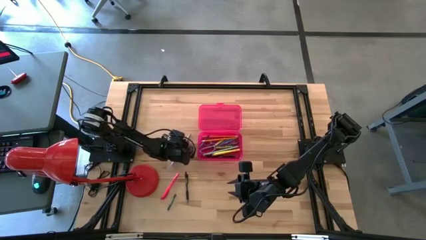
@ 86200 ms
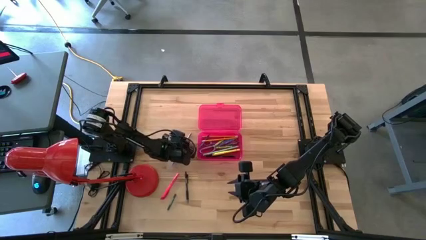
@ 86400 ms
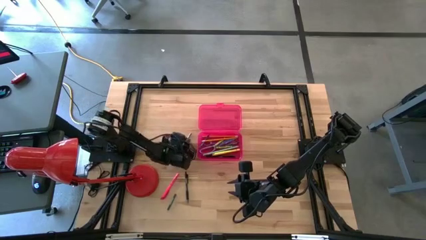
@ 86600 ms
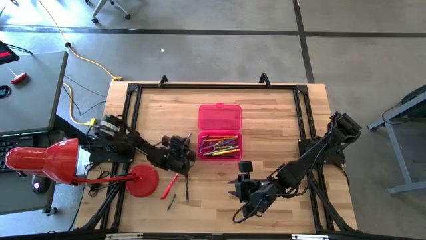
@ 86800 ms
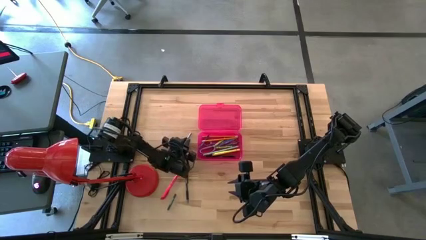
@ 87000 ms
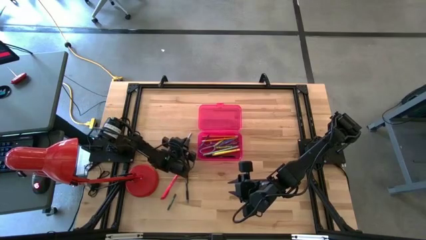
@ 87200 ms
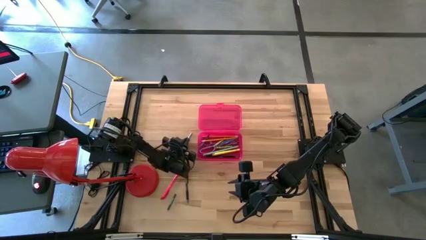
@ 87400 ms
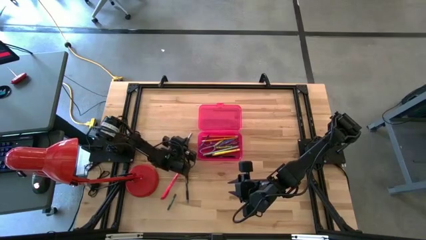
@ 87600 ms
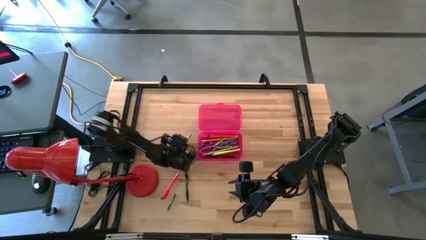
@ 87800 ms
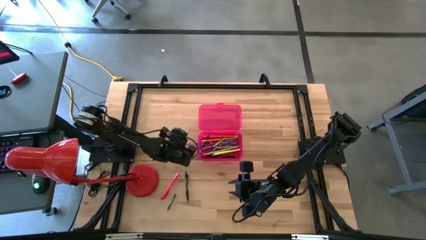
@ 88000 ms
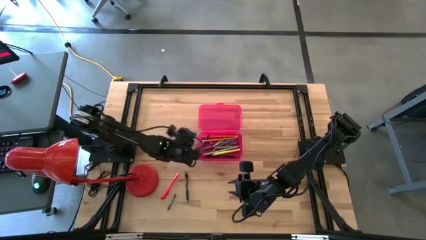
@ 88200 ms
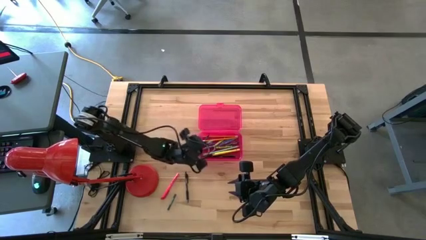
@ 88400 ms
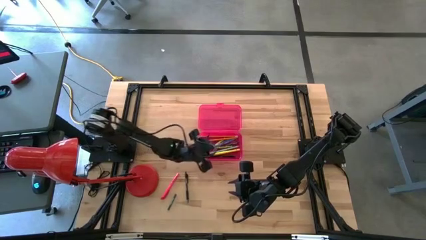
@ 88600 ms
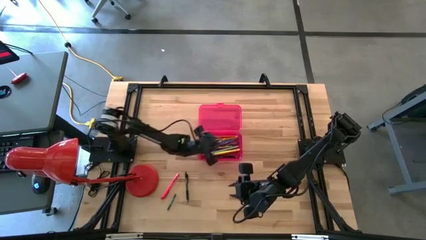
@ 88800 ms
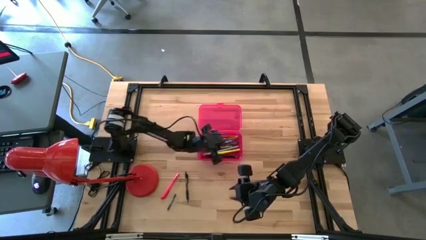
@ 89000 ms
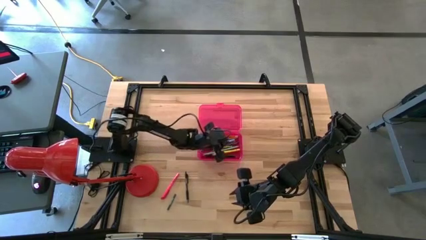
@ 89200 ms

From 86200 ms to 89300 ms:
Task: Pick & place school supplies into a supply box
Put the light blue pencil into the pink supply box

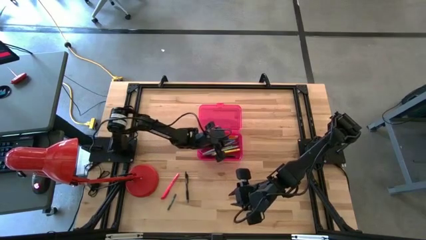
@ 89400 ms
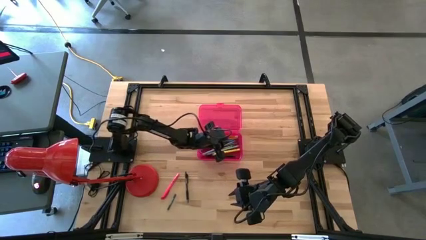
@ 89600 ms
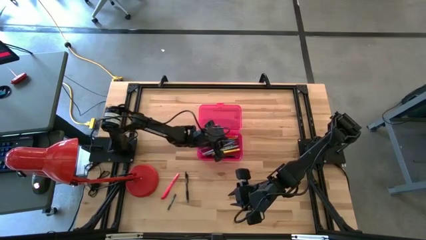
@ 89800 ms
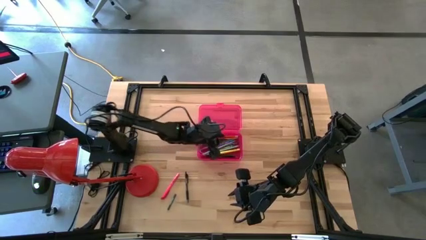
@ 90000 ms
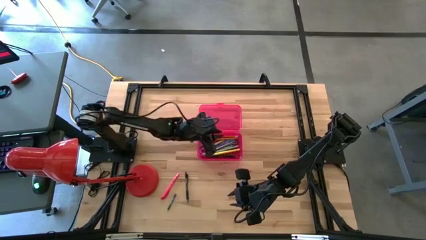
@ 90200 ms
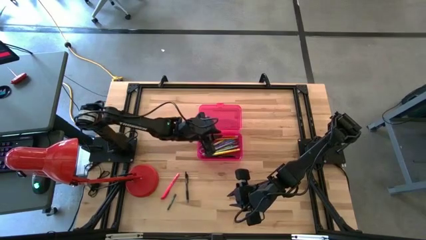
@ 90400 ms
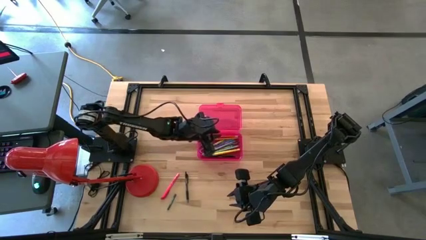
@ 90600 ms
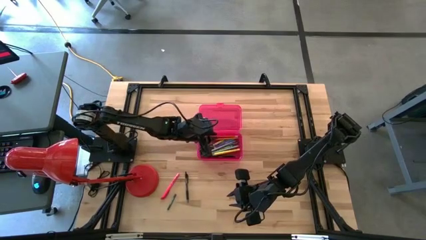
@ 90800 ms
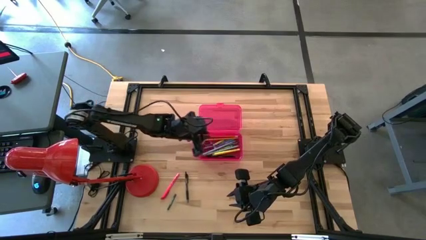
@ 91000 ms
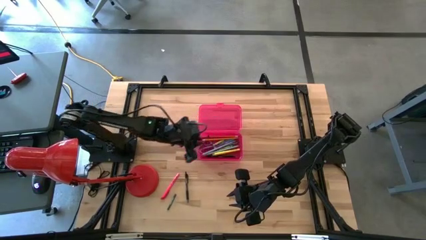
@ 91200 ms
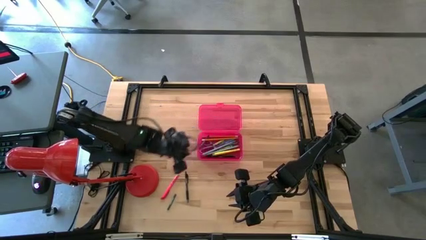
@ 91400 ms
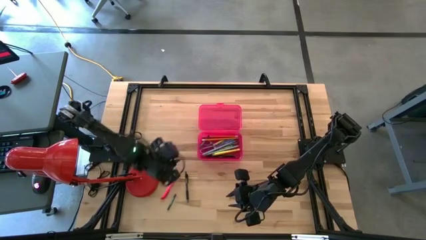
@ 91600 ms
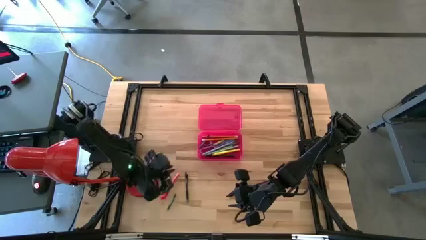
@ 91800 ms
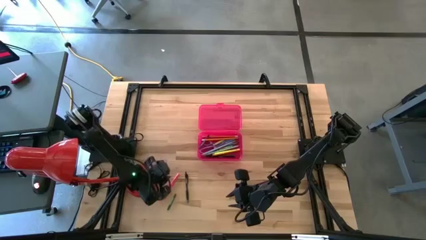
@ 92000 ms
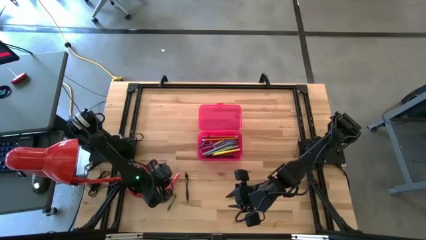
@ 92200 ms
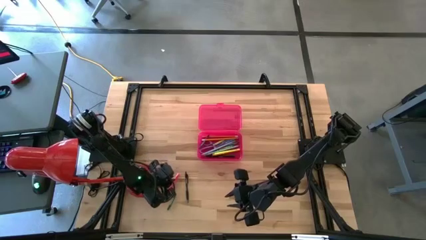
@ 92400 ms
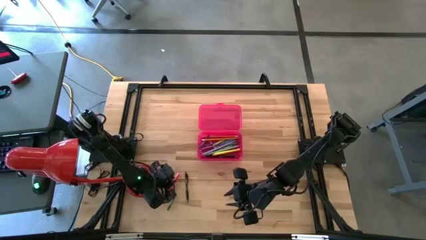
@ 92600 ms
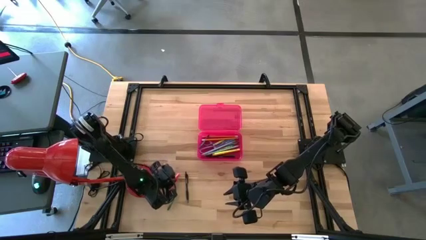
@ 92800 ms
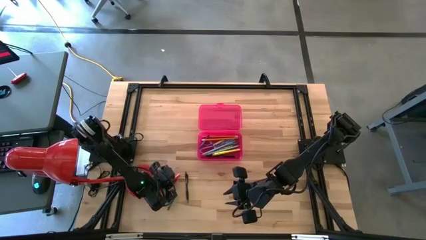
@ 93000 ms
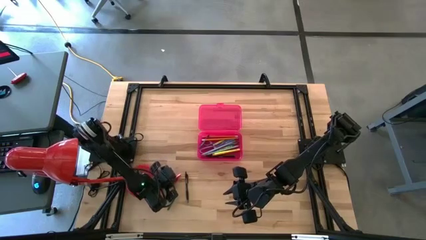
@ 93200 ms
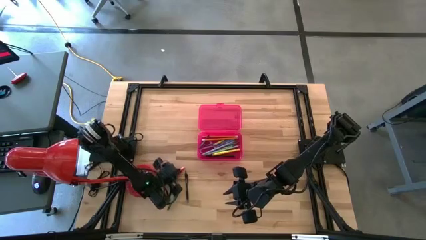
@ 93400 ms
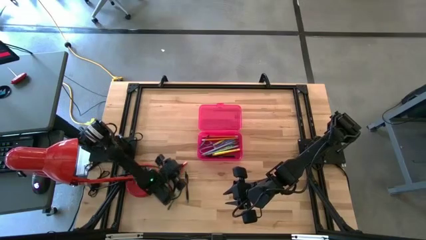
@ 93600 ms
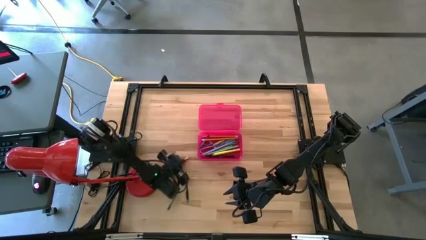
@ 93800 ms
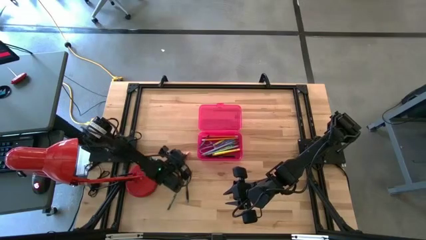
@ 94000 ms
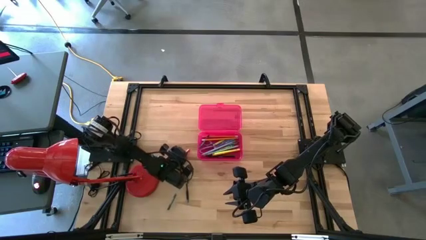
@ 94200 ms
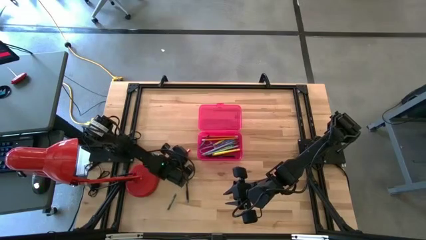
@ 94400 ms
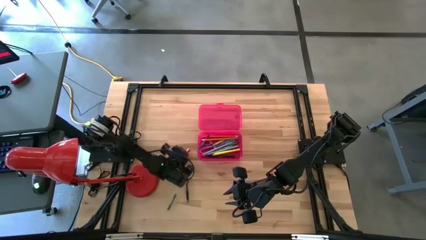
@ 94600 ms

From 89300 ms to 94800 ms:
Put the pink pen into the pink supply box

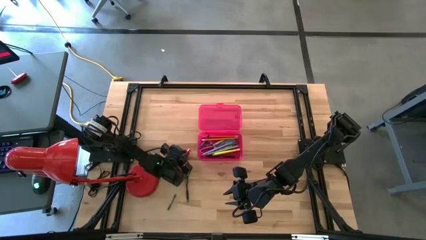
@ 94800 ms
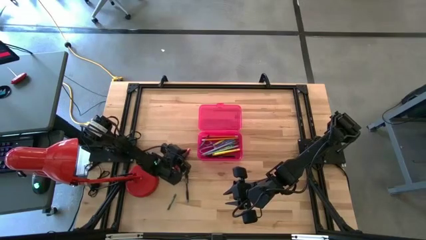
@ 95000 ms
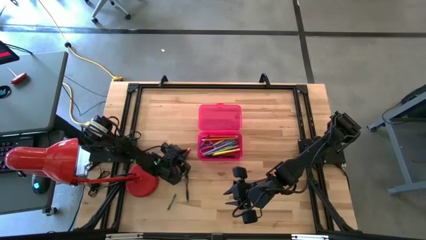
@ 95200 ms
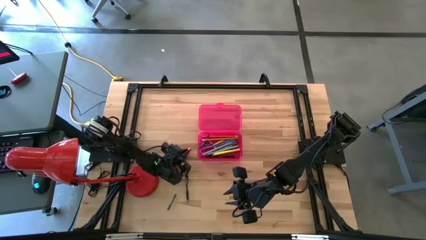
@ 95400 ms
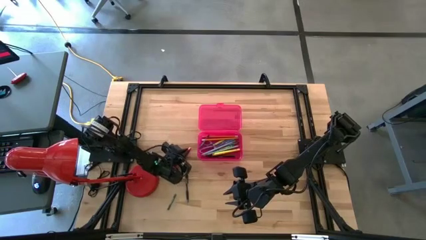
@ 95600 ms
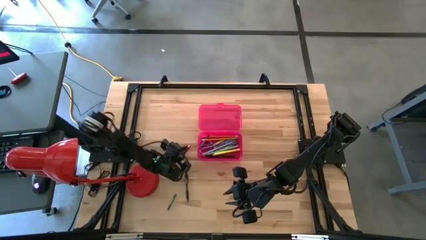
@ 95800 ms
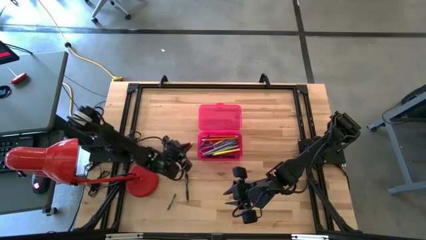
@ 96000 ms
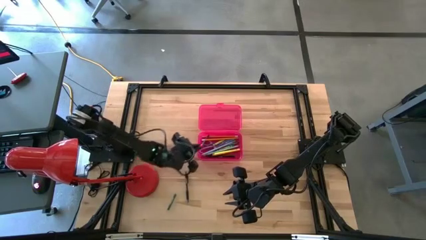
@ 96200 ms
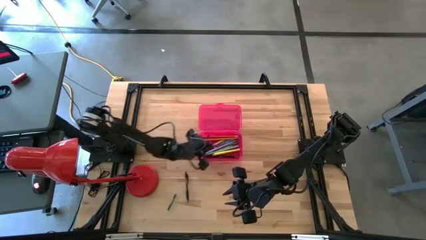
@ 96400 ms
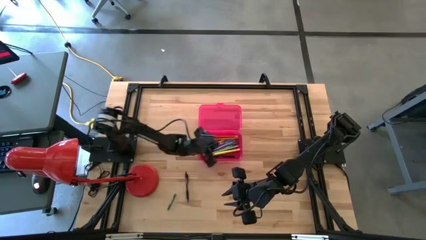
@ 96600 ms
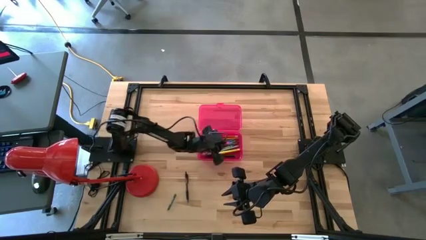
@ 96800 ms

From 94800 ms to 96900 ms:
Put the pink pen into the pink supply box

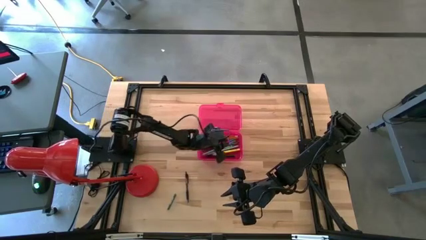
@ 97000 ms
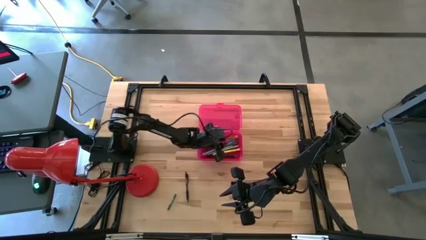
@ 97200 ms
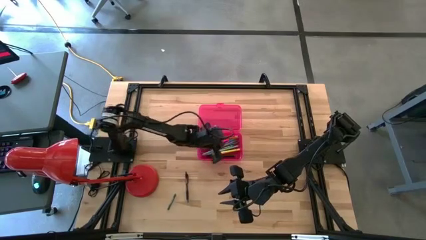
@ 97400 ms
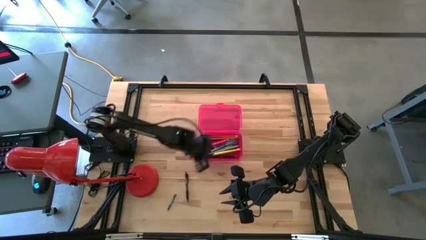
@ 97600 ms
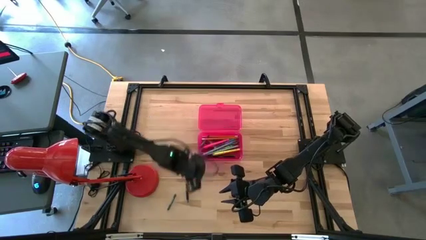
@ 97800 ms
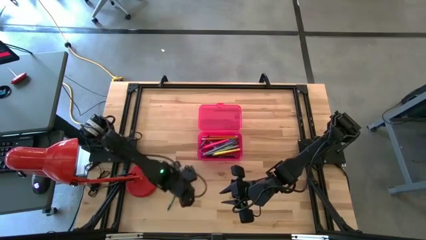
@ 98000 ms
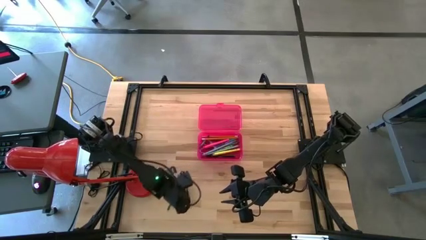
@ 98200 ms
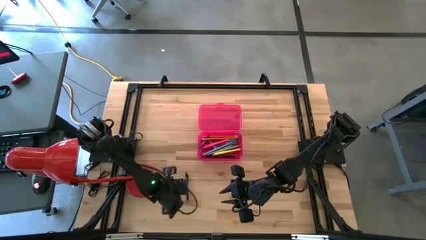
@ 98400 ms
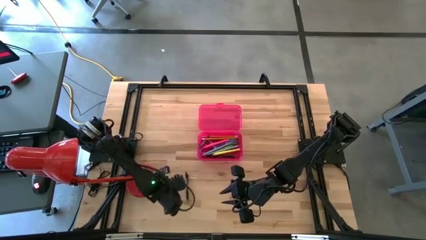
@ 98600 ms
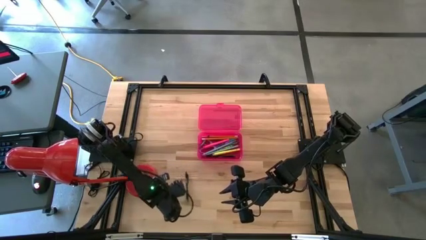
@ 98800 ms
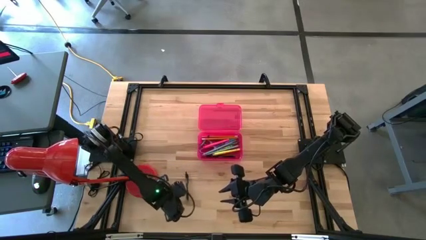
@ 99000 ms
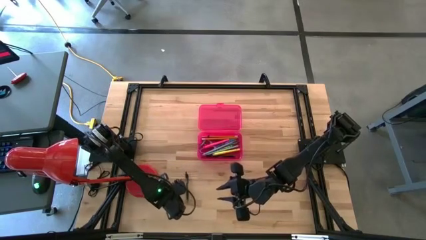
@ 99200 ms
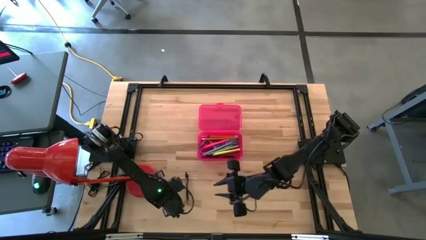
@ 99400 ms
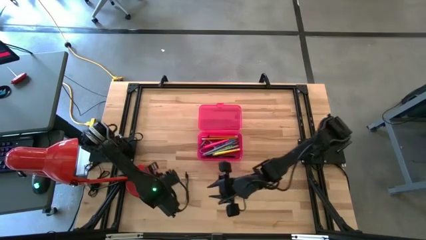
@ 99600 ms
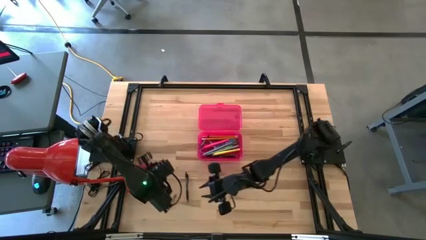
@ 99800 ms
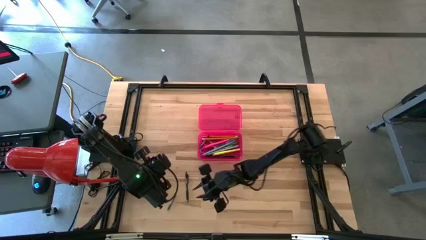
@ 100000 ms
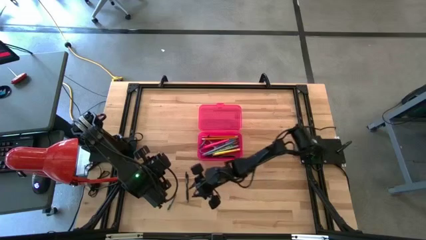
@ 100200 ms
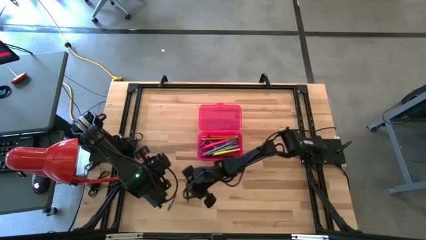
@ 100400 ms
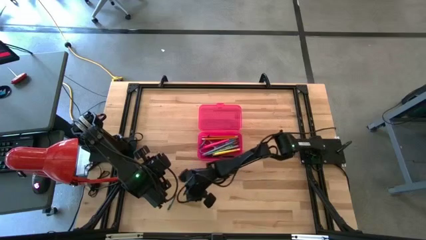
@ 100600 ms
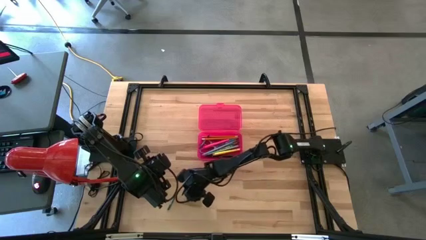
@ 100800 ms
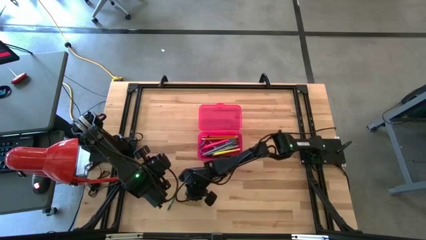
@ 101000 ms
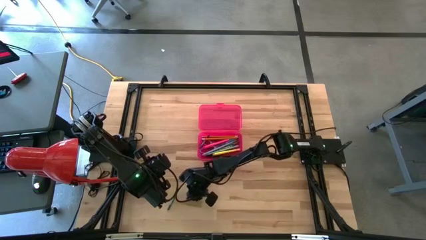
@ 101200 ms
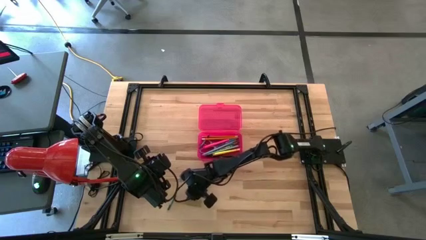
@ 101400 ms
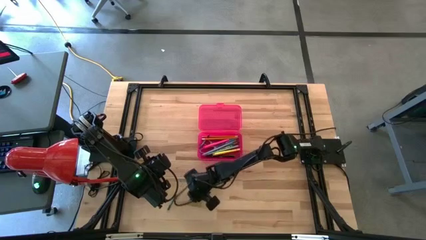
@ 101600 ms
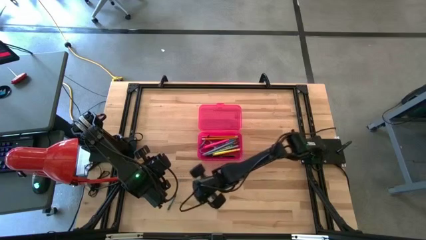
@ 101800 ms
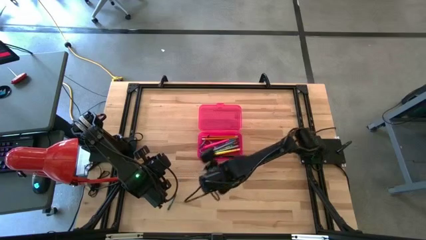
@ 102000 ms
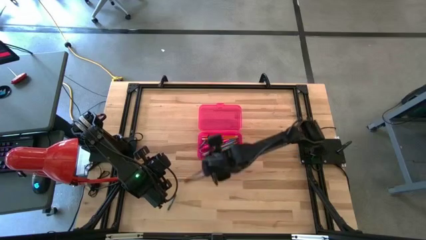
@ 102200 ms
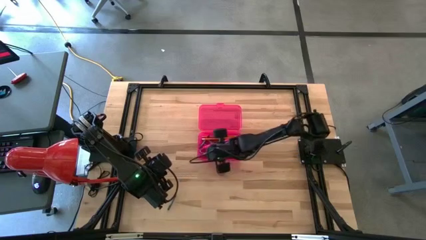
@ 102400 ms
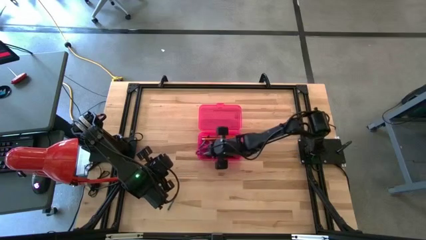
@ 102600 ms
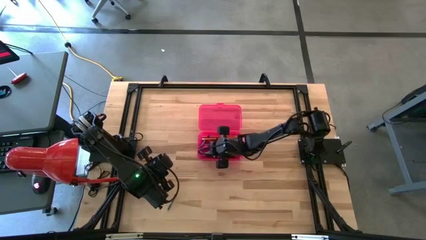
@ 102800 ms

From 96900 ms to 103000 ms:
Put the black pen into the pink supply box
